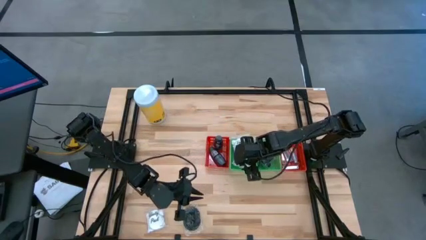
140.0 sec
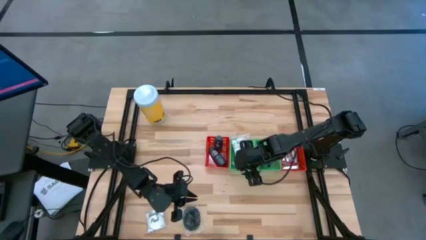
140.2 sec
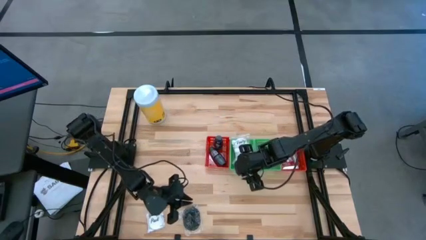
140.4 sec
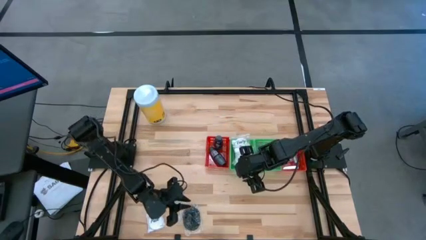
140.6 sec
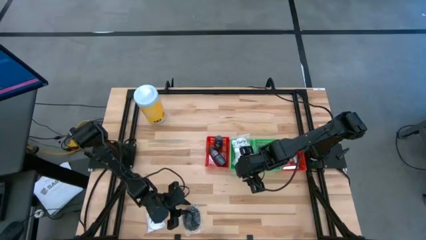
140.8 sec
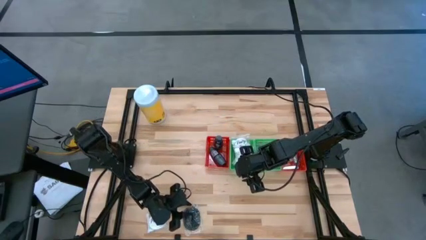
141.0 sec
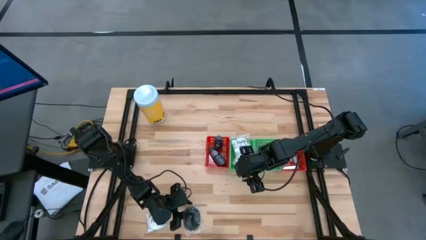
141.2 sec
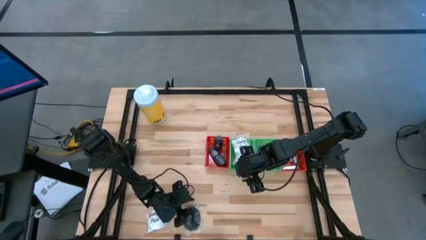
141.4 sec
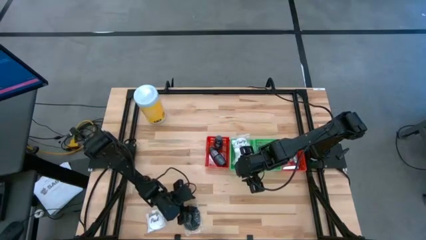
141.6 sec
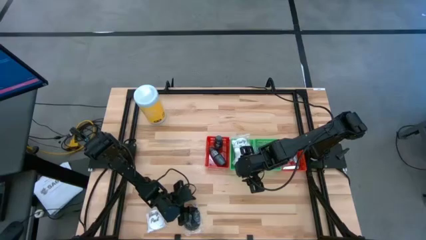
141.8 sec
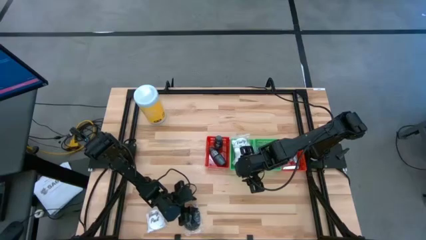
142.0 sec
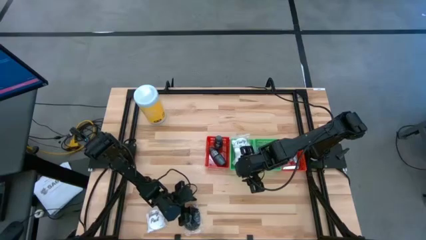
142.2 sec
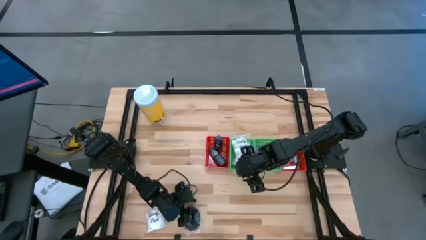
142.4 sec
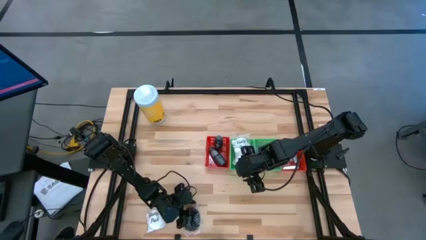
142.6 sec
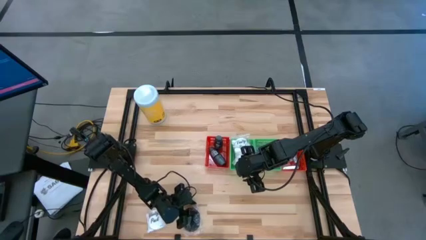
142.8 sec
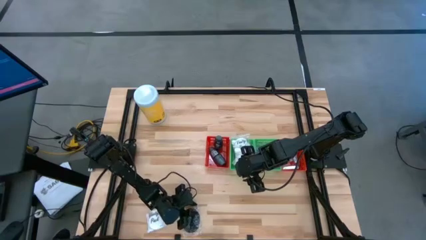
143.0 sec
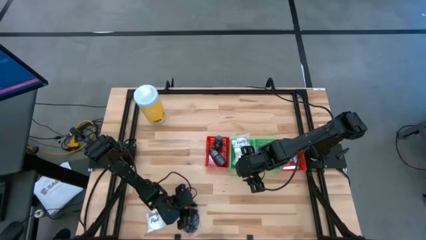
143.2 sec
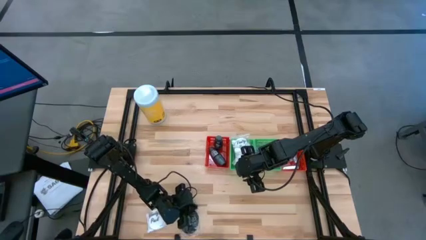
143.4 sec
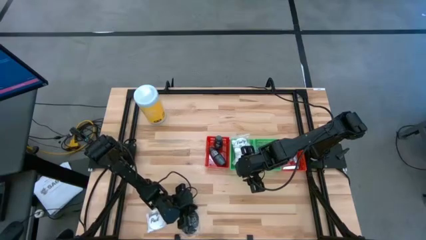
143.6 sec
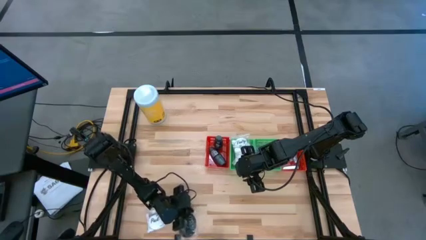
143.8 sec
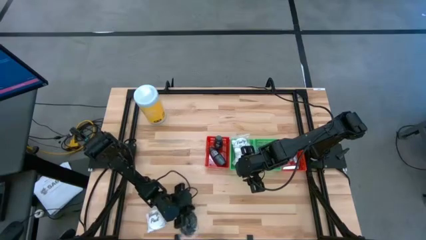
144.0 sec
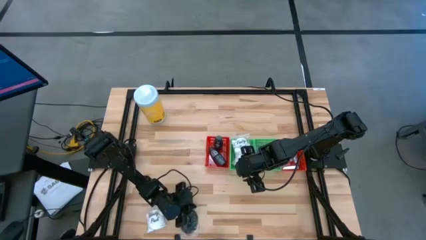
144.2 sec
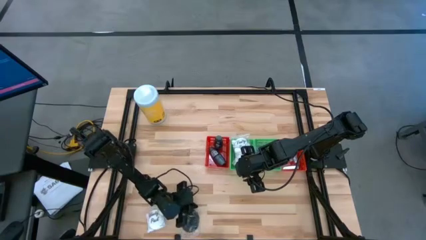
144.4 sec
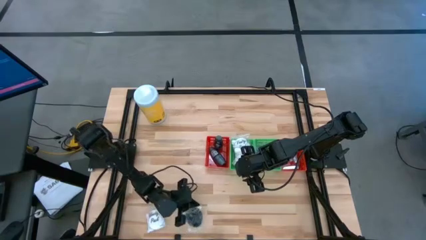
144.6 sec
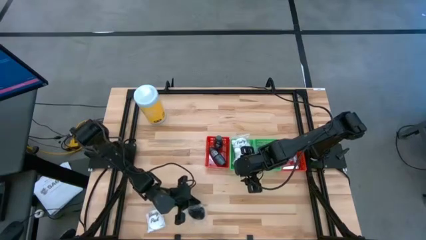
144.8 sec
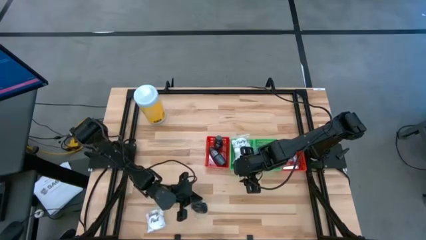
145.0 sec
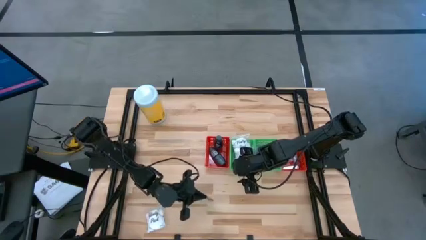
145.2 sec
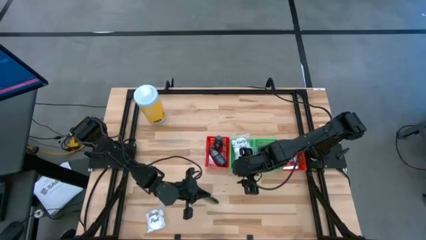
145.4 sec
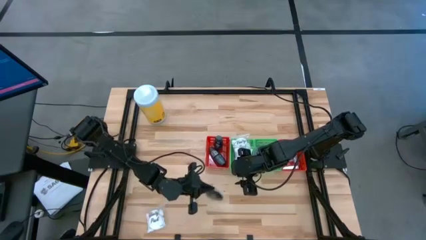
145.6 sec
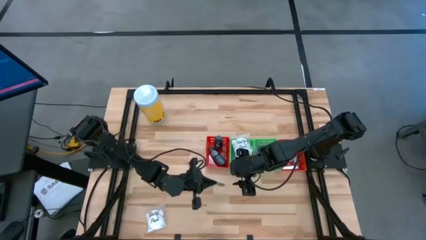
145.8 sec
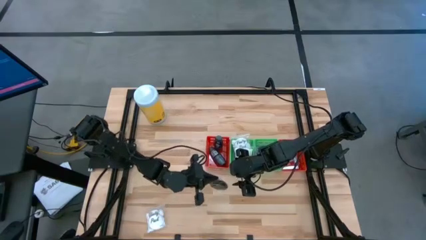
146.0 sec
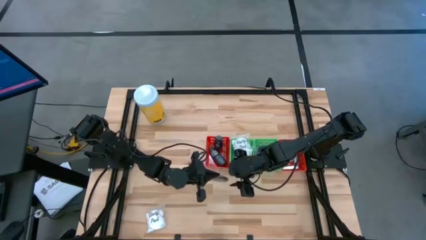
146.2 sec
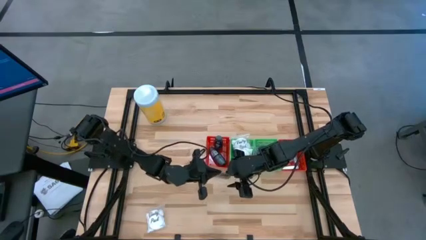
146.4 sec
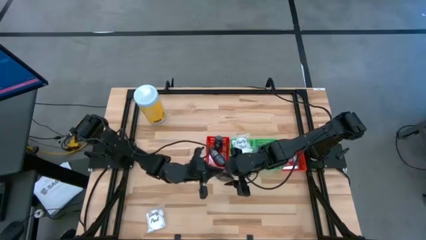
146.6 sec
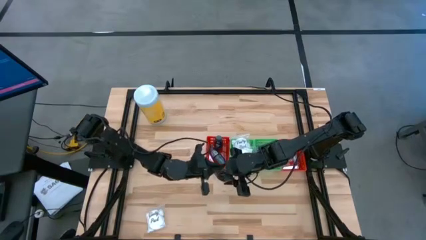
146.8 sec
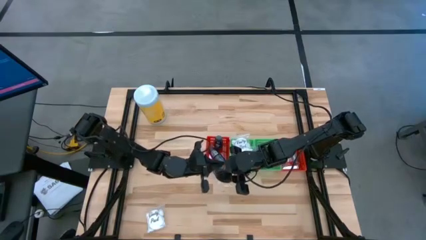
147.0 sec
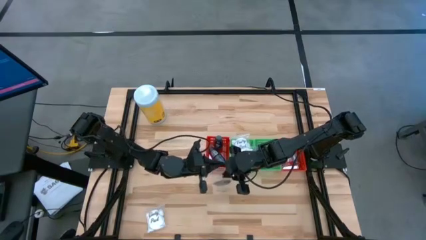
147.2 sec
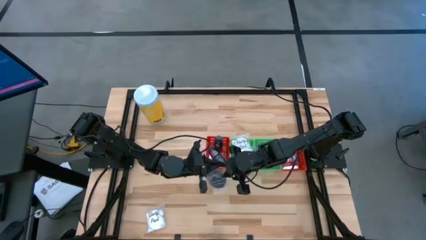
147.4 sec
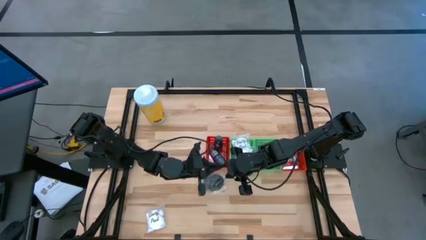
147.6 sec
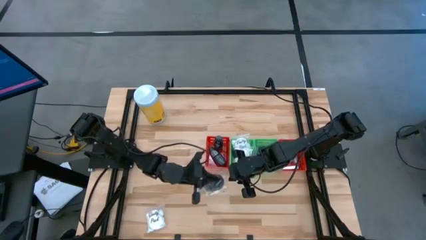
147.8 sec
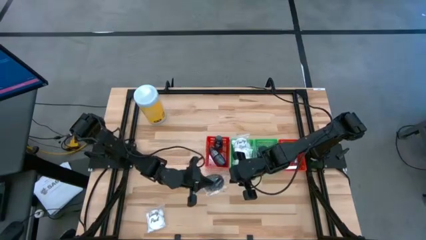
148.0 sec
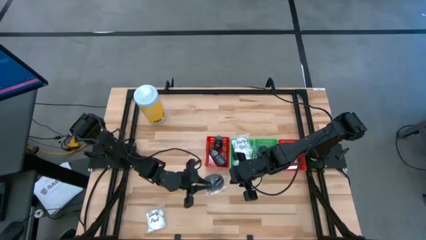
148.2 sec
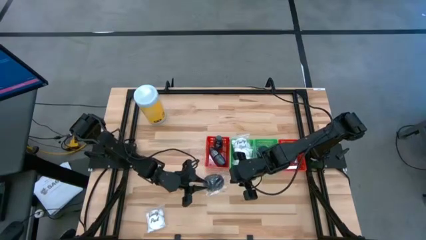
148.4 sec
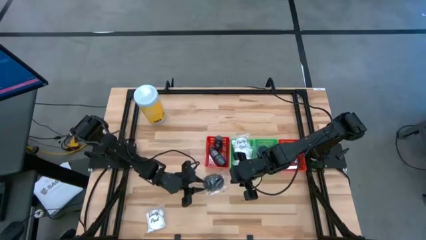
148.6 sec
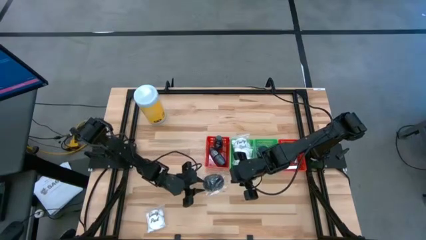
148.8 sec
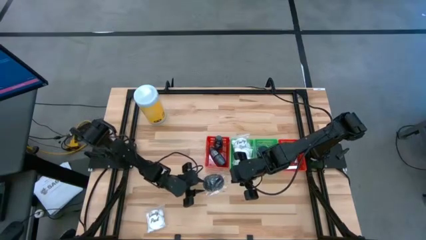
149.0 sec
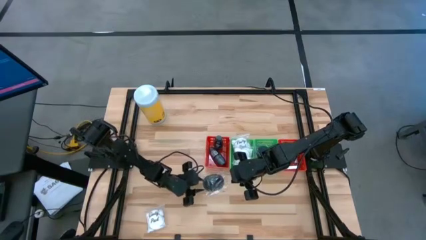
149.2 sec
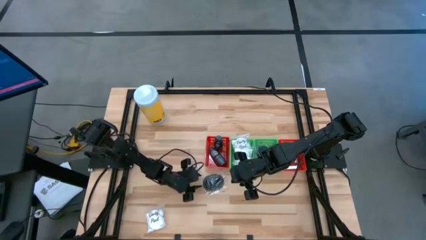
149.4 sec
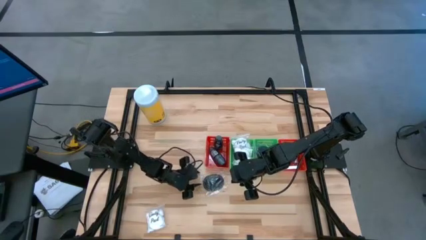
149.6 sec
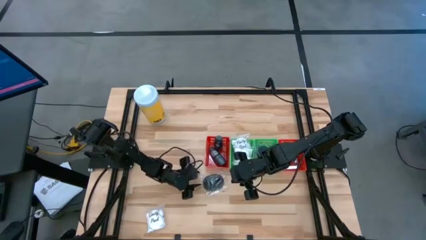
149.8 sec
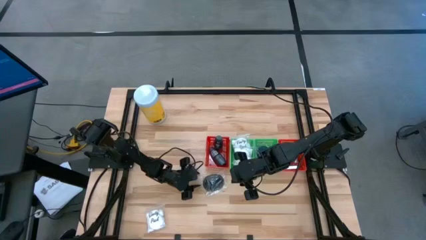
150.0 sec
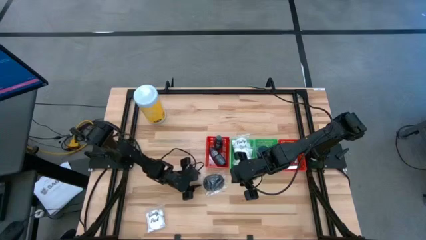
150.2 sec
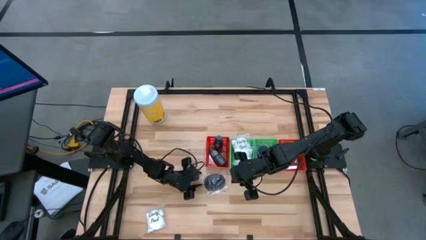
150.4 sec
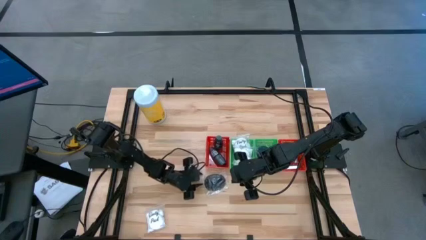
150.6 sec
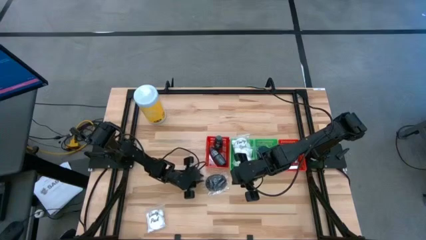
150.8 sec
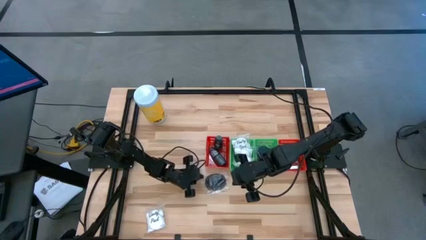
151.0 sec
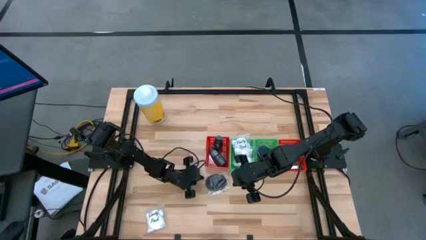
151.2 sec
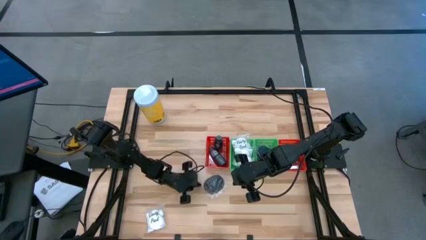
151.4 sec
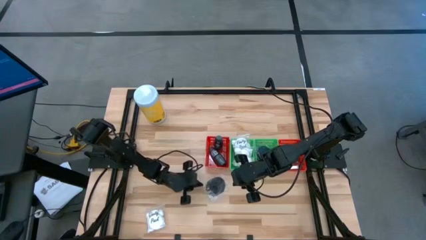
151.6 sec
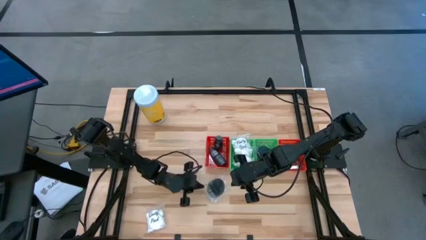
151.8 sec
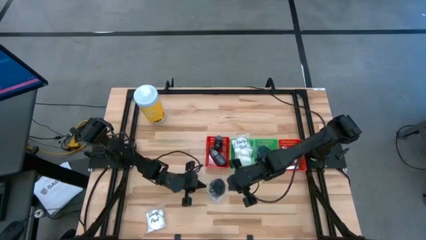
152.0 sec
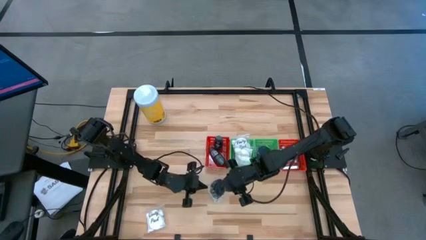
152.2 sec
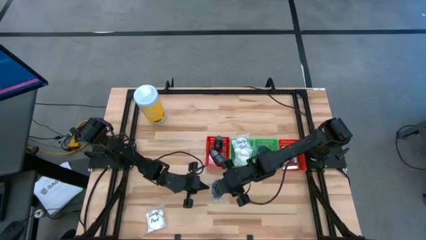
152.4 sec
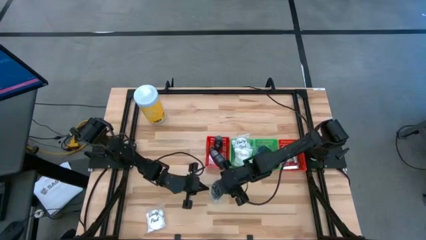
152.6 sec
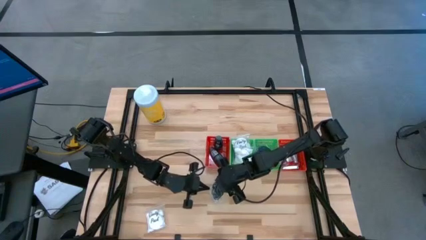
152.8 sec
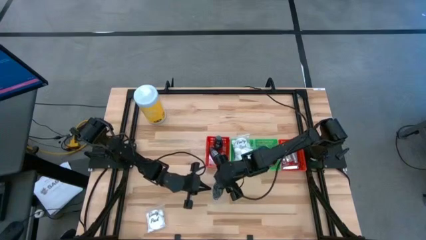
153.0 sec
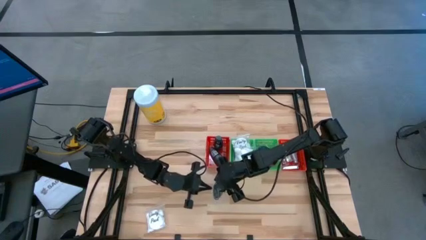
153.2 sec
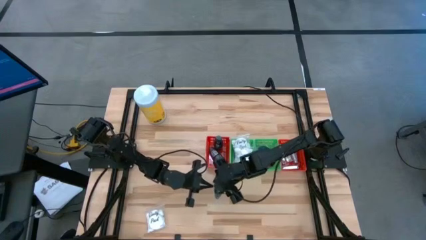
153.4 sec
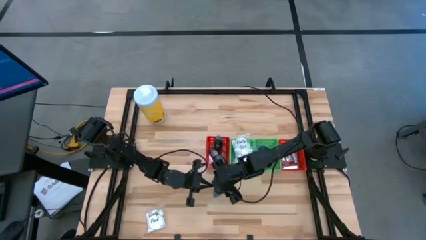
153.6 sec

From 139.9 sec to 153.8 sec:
Task: Pick & Place Travel size toiletries
Put the black hairbrush into the right green bin

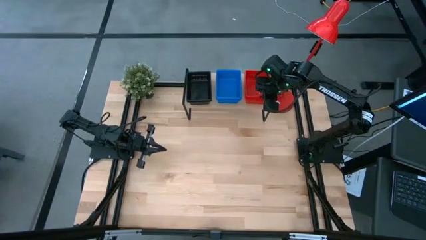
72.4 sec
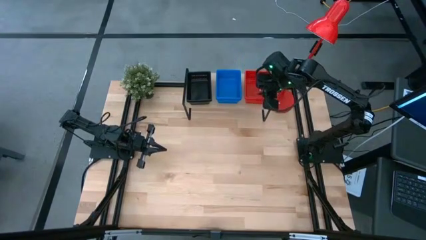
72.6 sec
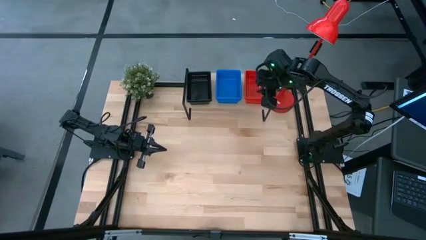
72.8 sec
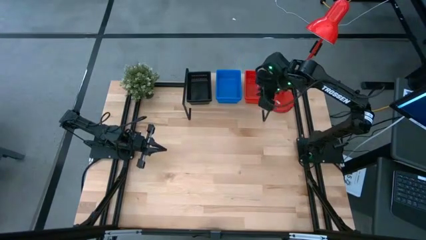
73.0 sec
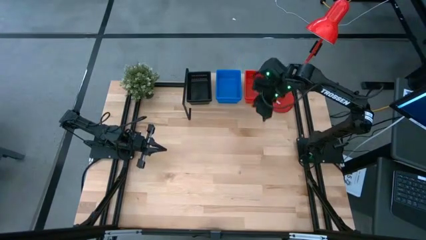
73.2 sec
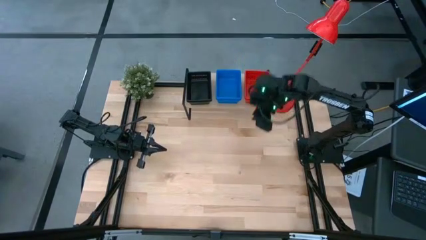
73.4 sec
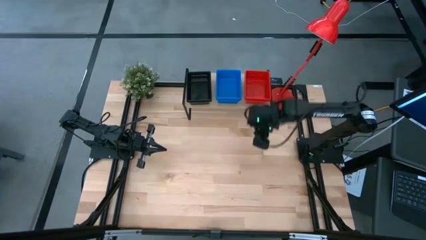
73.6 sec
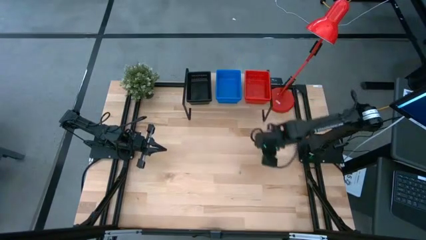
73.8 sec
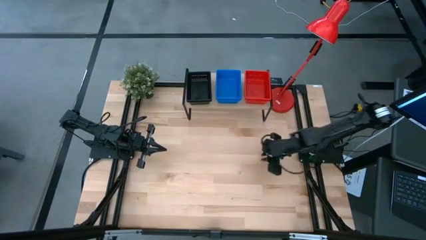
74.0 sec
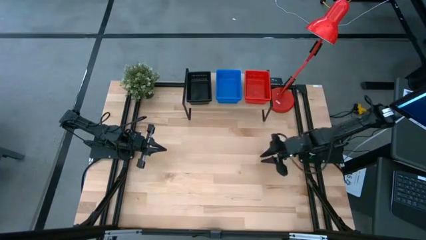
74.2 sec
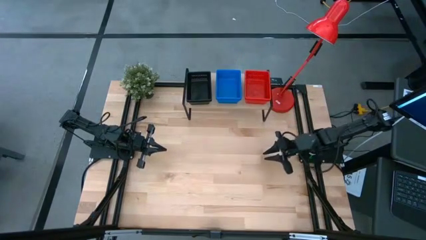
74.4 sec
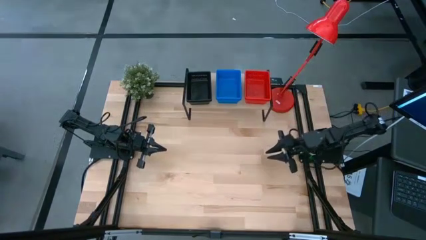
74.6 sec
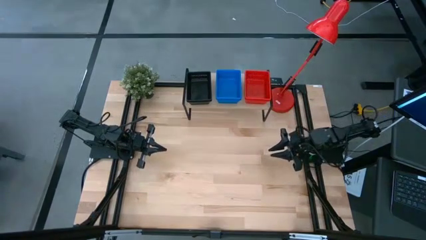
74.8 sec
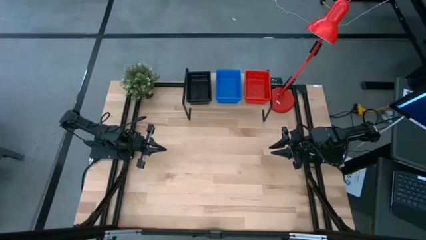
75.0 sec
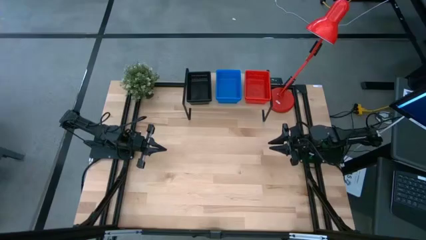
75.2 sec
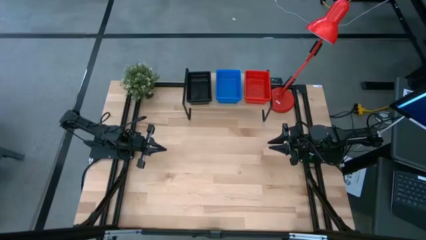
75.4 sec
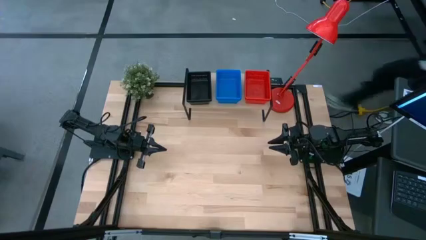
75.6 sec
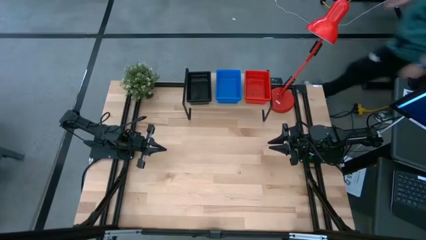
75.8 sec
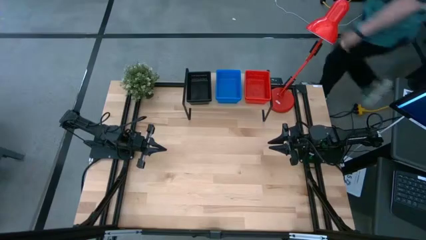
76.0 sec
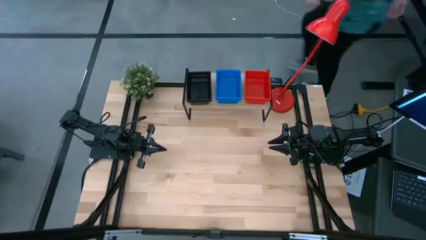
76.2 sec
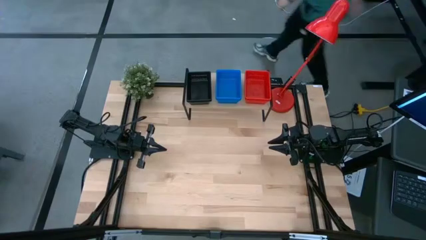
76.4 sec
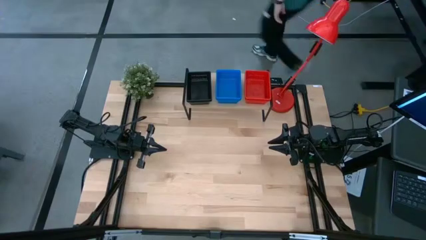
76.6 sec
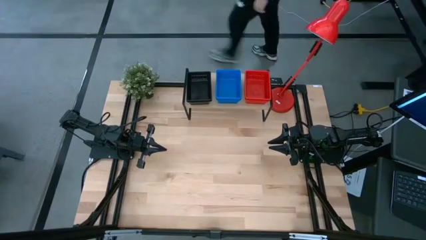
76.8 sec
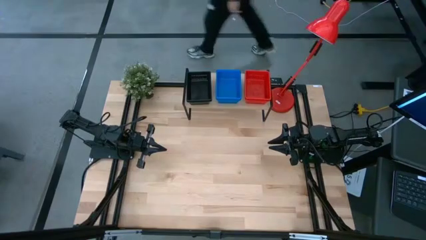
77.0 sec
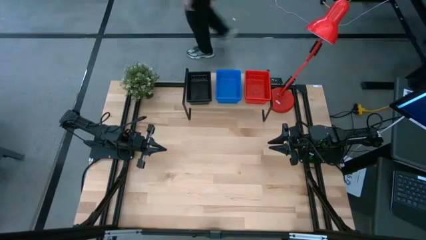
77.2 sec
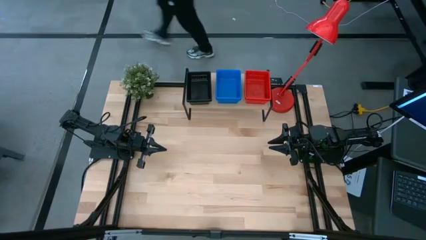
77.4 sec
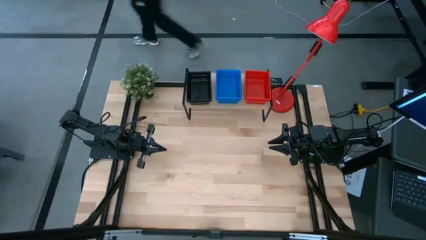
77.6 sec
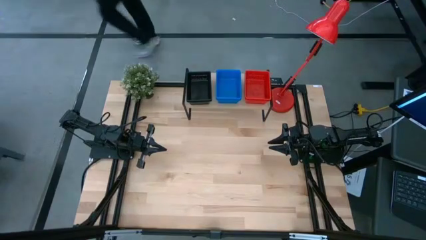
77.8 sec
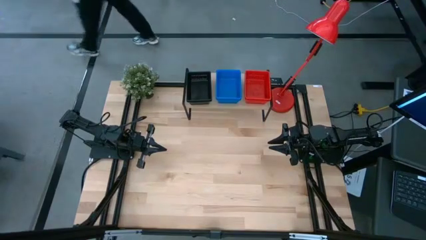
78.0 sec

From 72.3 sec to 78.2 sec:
Task: Stack baskets on shelf by color
Return to Home Position
